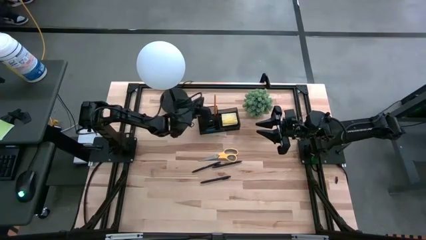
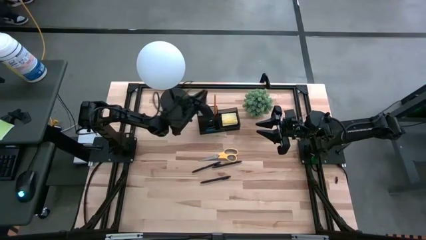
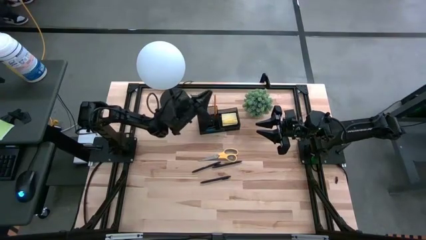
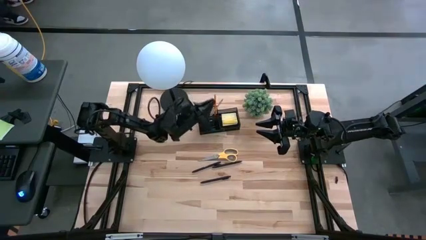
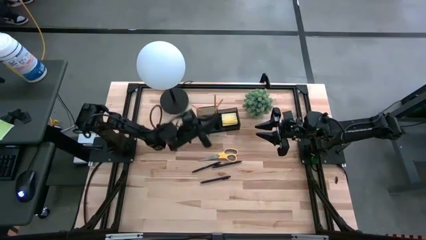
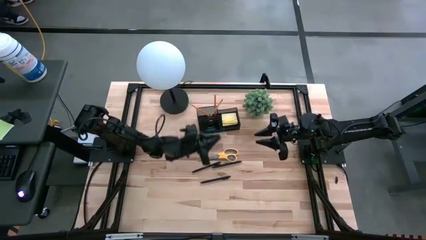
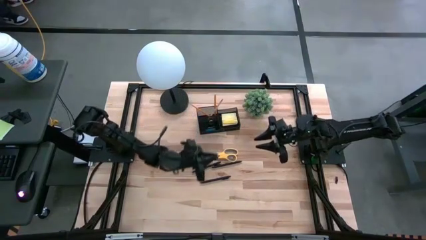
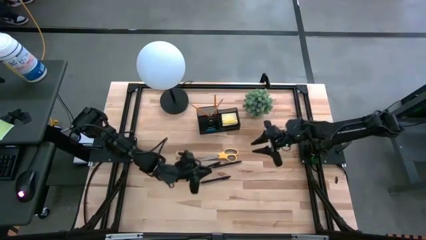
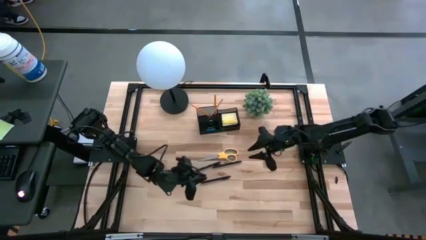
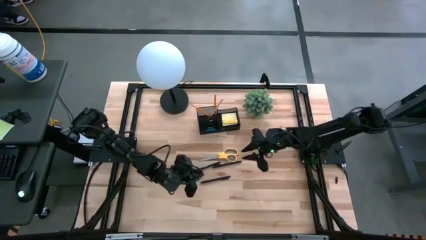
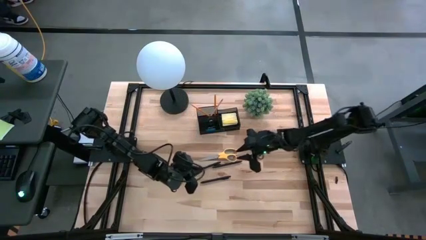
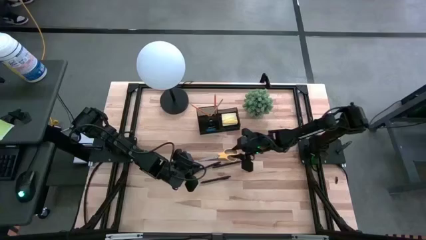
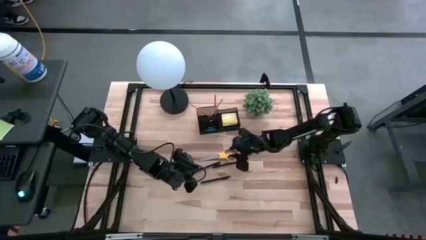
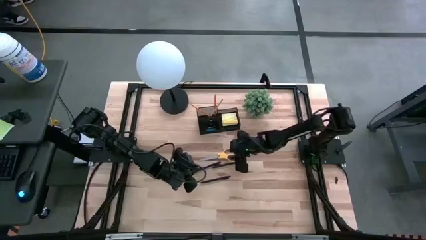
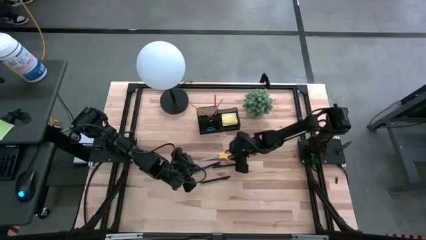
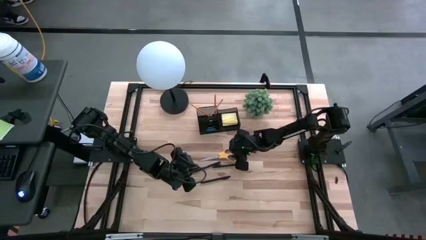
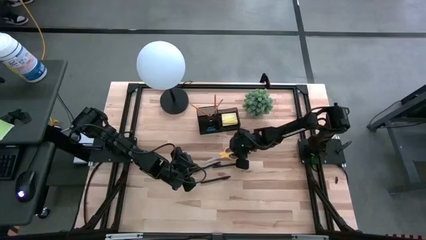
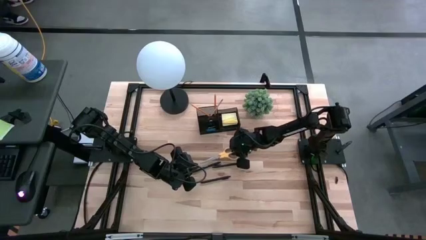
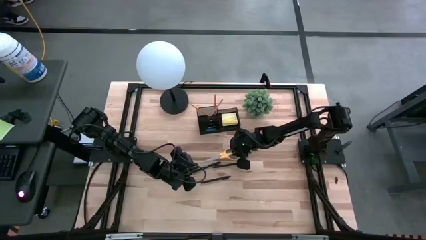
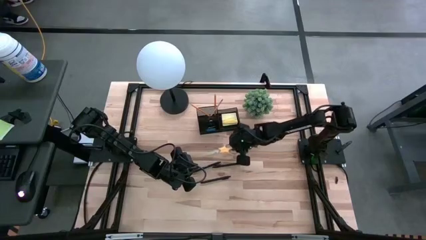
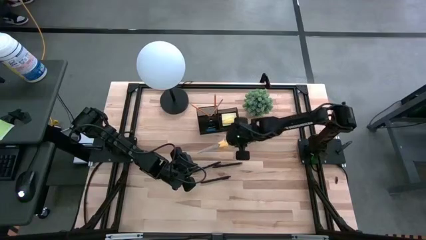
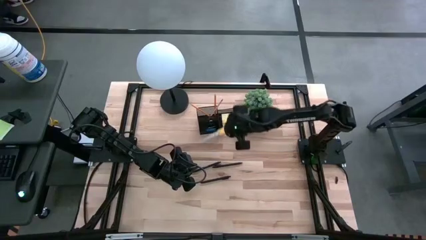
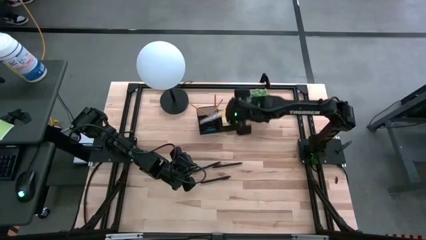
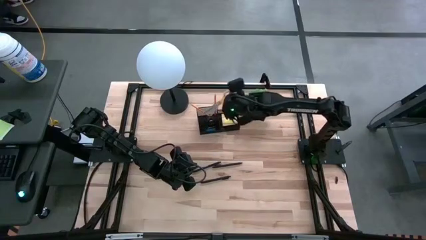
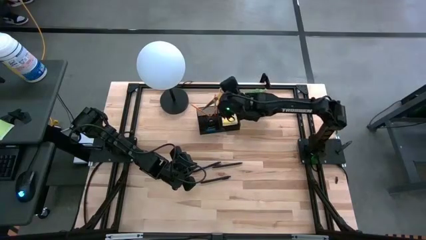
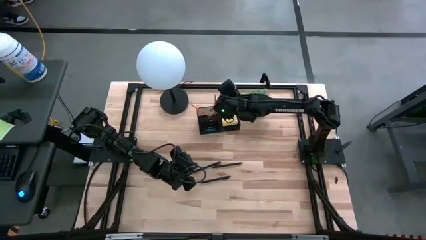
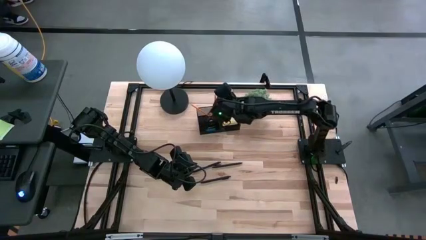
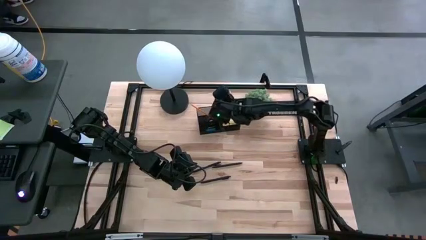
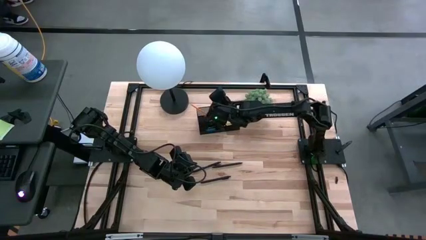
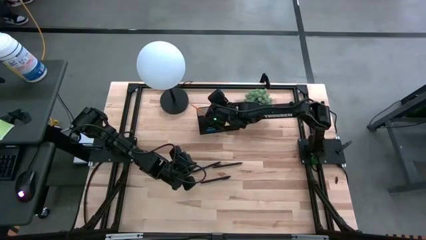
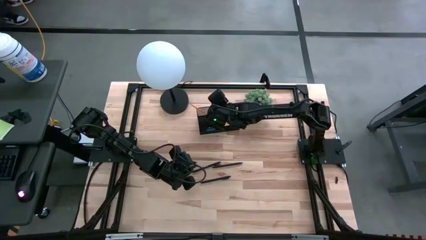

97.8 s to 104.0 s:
Task: Pick and place office supplies into organizer
Put the scissors into the desk organizer

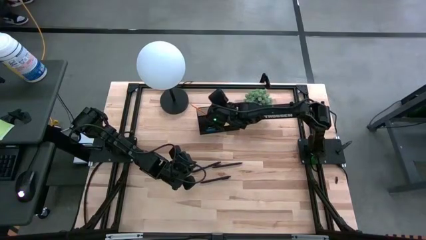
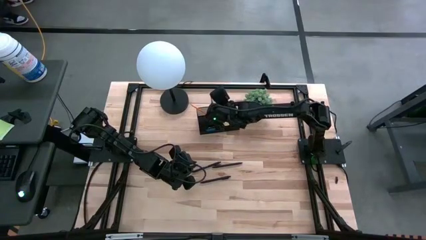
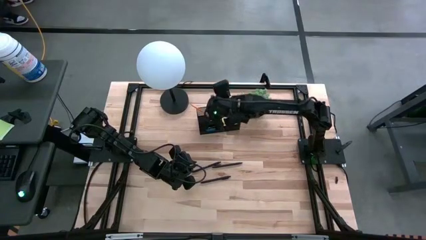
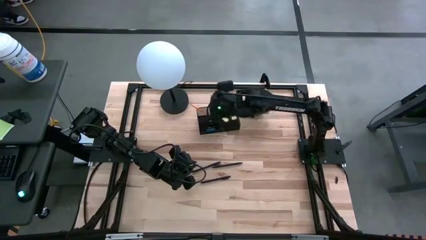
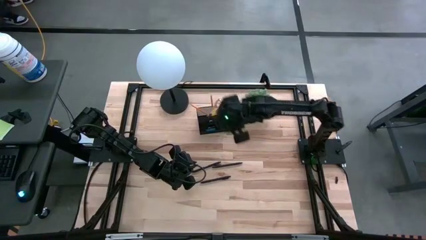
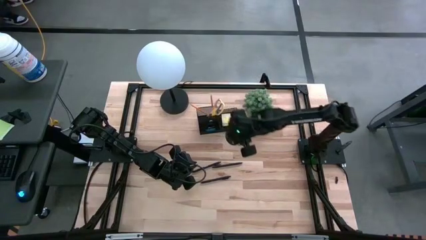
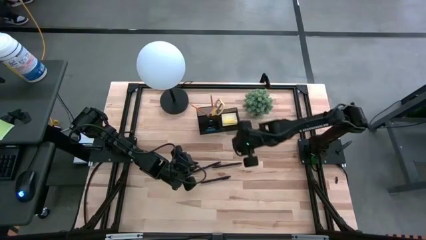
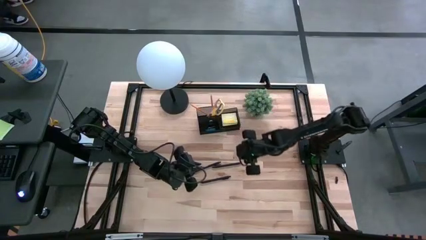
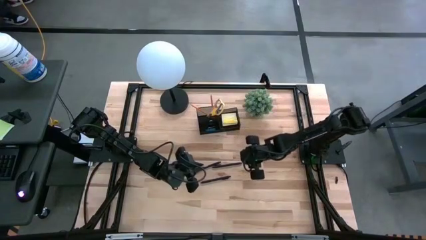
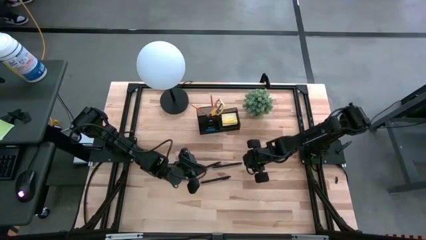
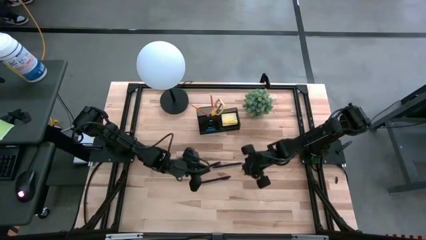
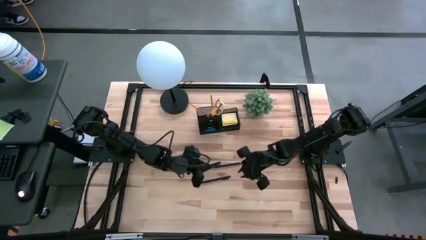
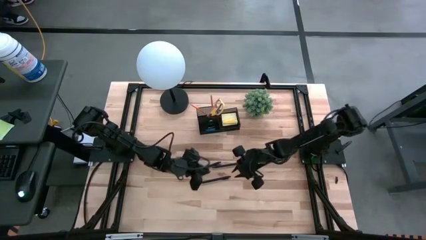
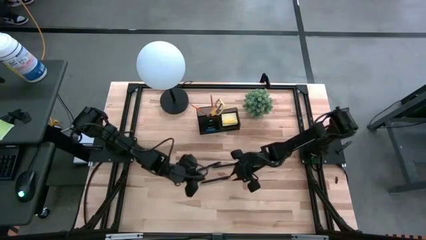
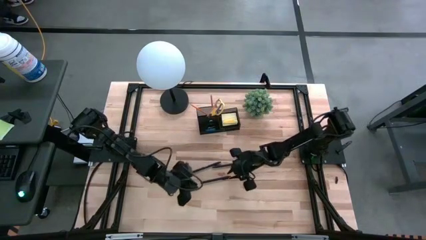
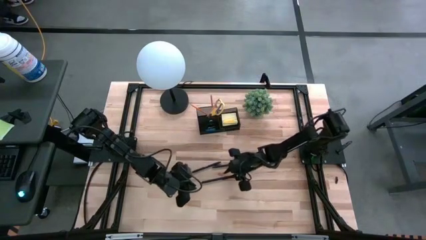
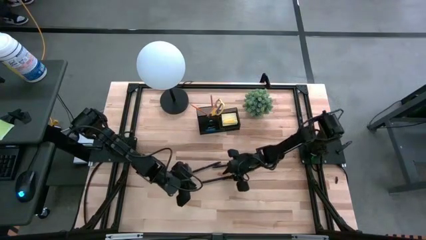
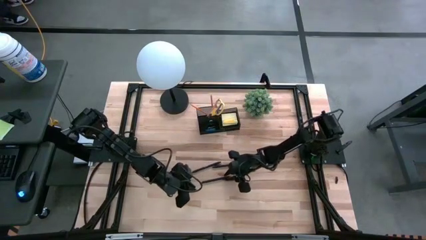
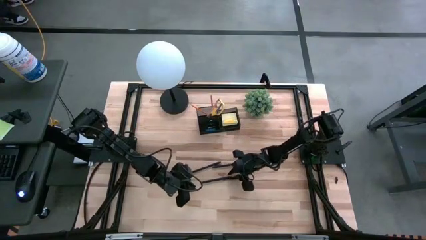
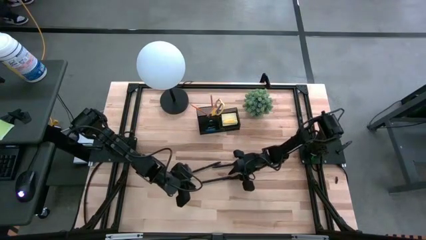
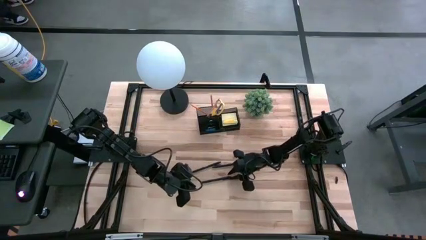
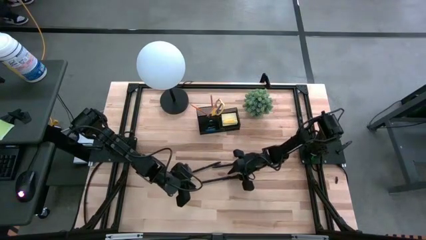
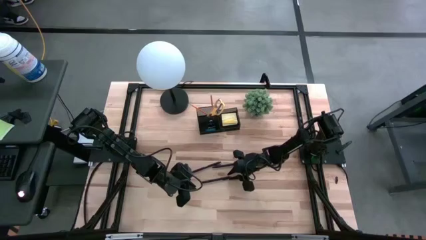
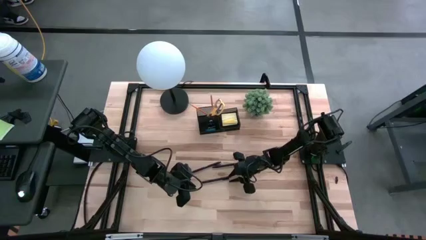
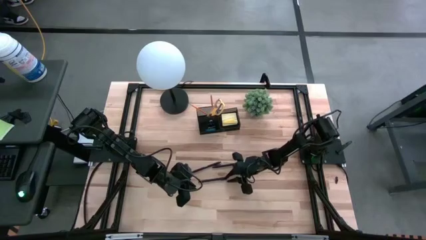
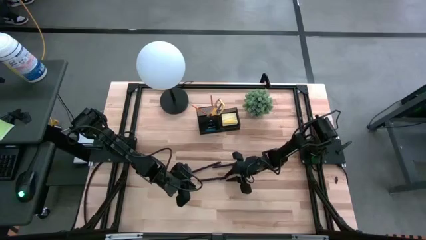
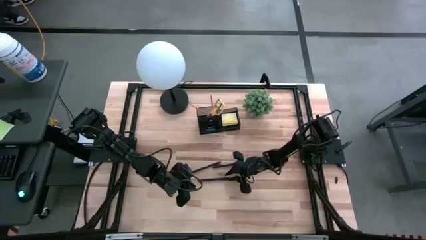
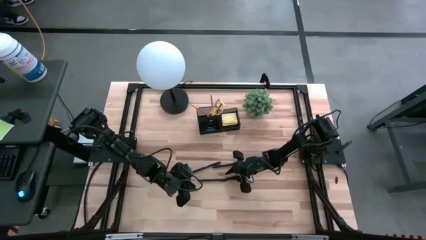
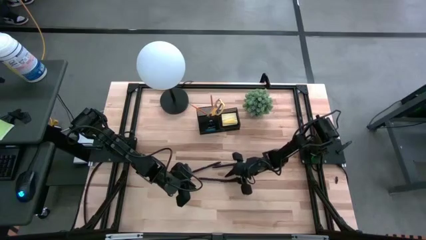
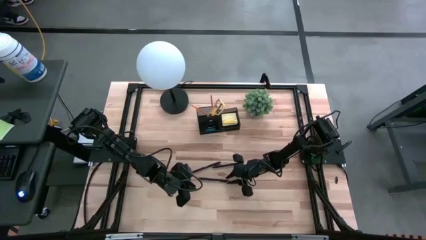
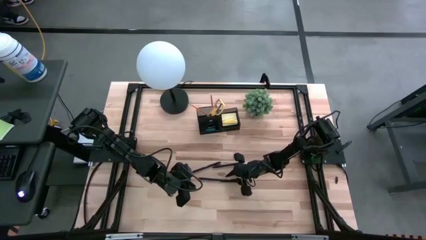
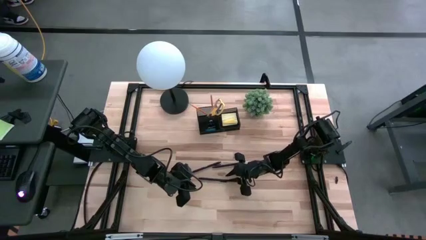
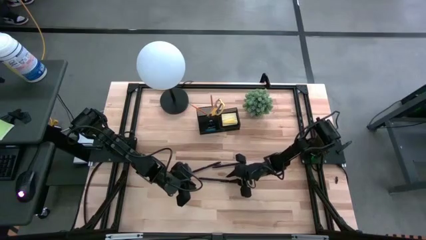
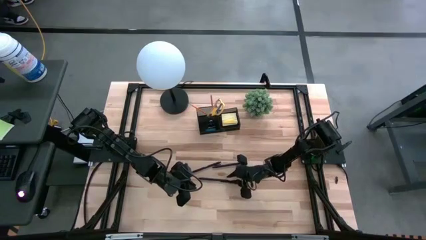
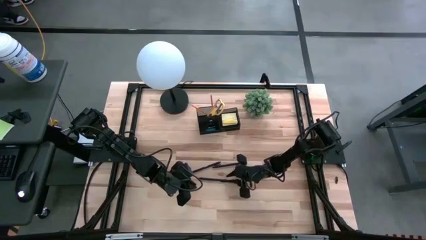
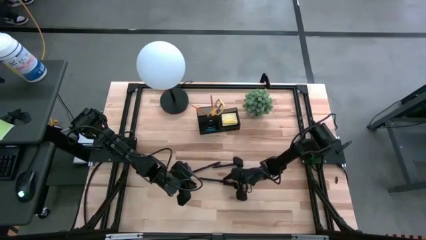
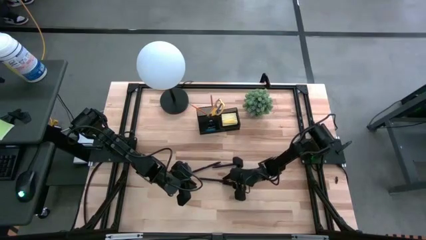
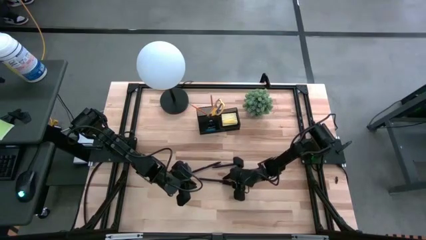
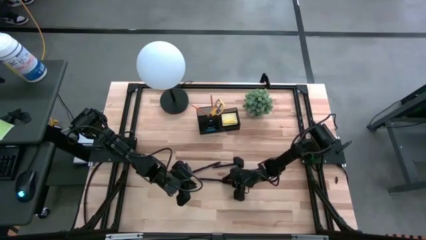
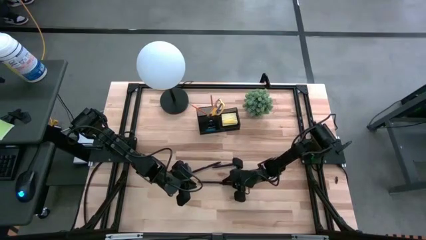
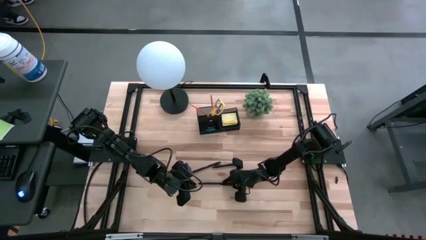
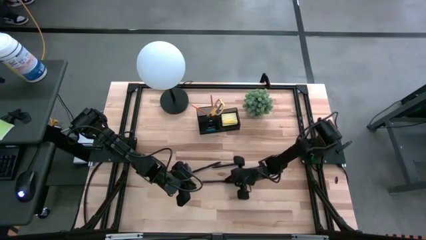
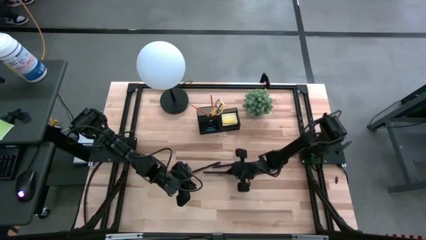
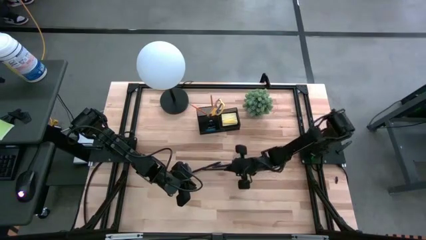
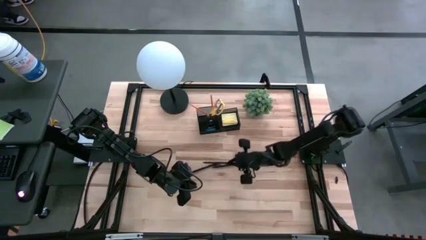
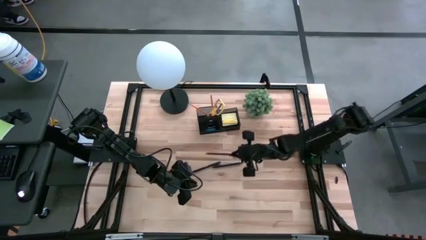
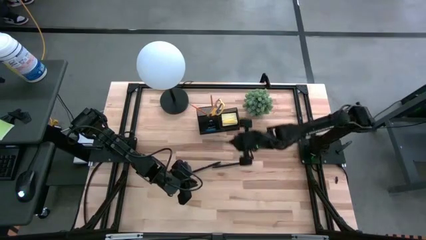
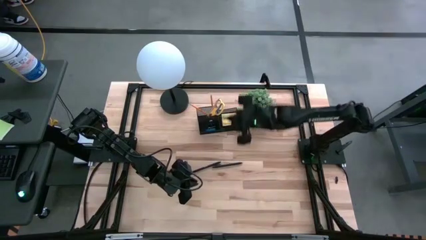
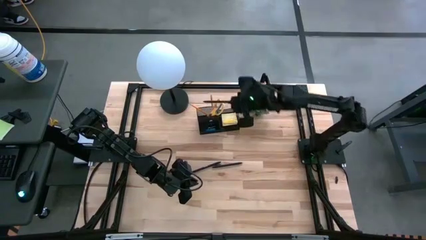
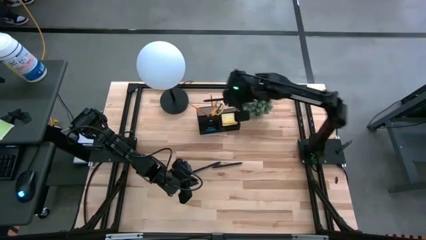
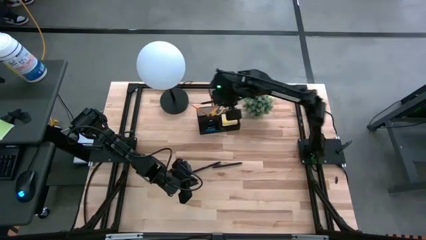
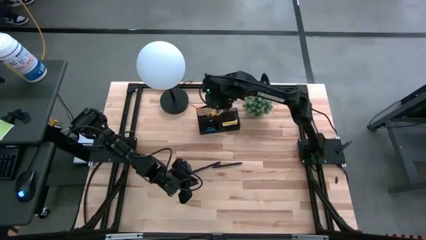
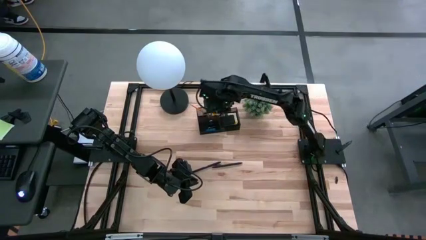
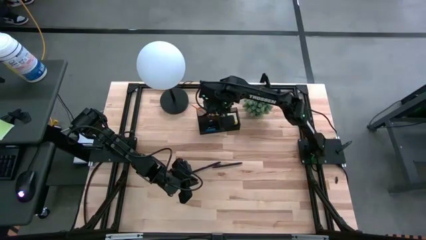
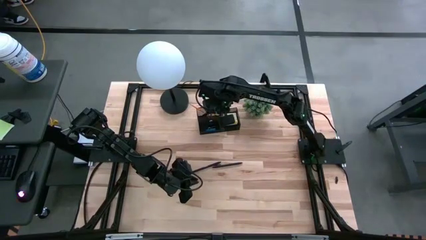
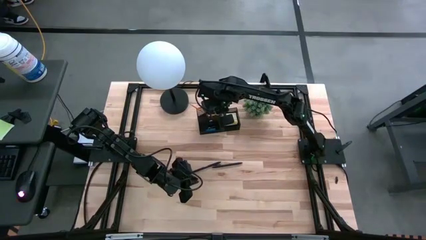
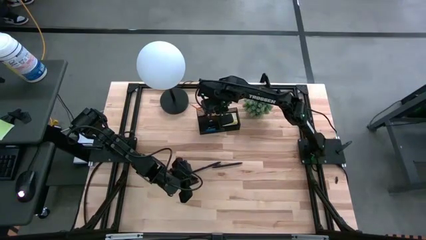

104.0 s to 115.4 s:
Put the bottom pen into the desk organizer
